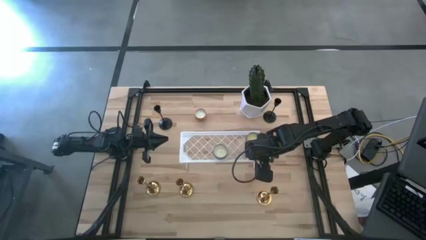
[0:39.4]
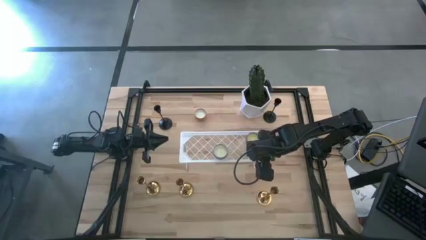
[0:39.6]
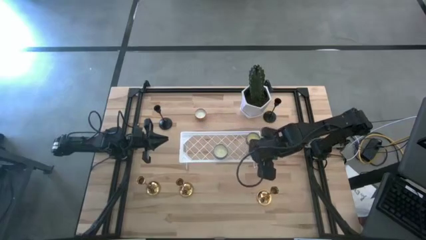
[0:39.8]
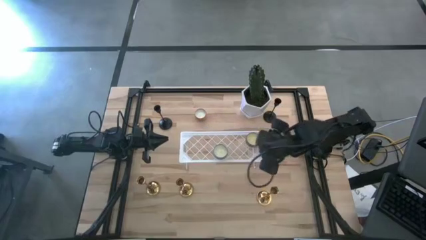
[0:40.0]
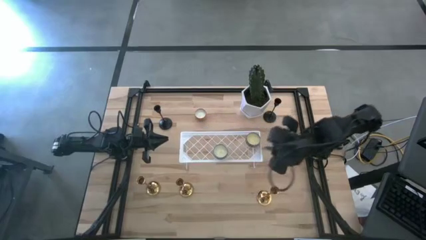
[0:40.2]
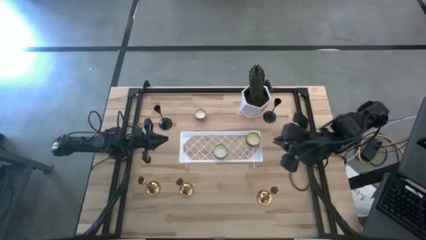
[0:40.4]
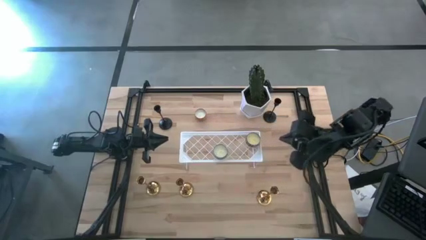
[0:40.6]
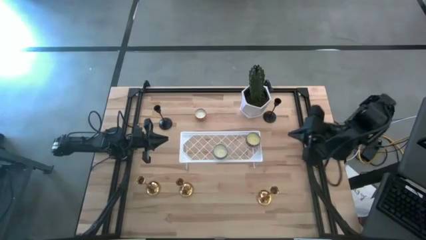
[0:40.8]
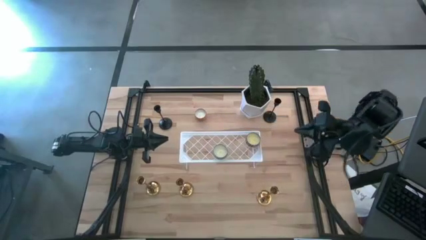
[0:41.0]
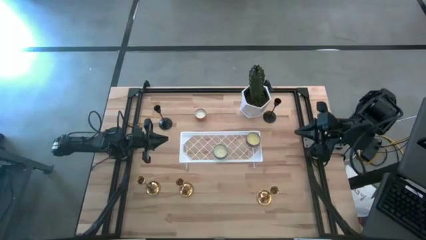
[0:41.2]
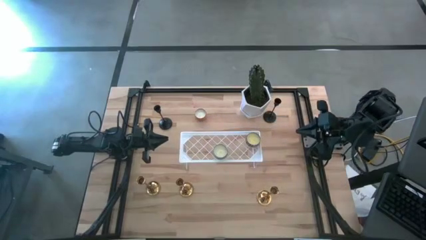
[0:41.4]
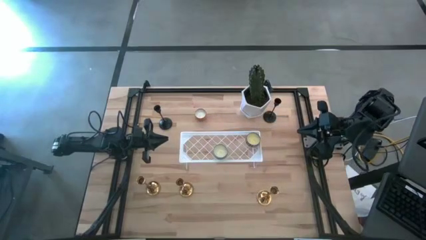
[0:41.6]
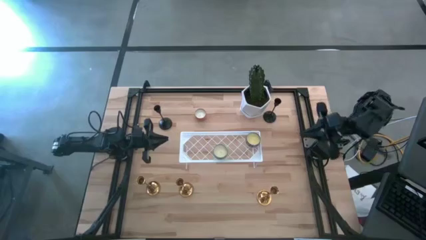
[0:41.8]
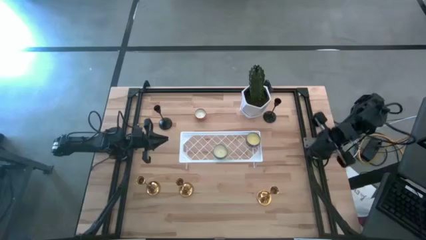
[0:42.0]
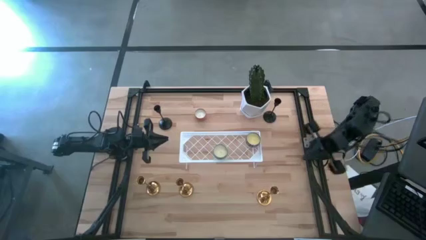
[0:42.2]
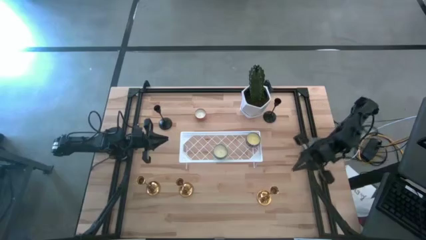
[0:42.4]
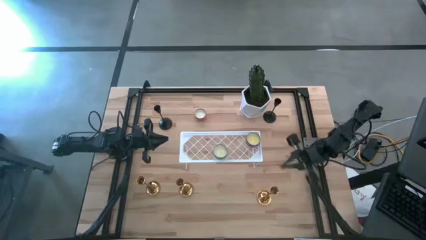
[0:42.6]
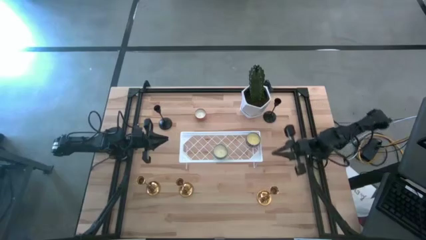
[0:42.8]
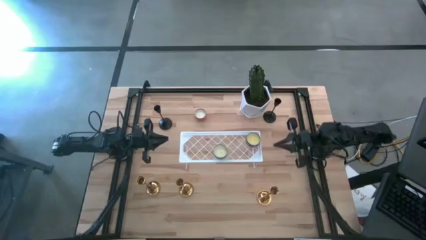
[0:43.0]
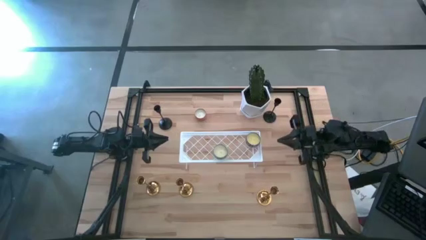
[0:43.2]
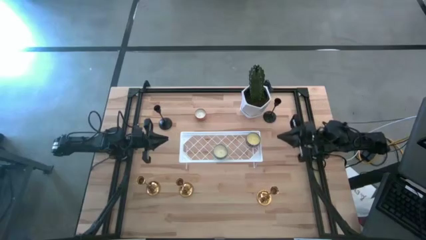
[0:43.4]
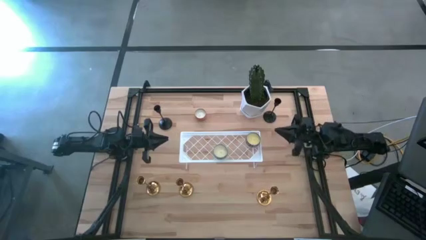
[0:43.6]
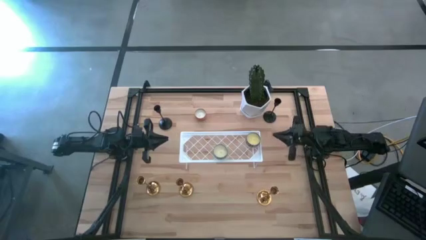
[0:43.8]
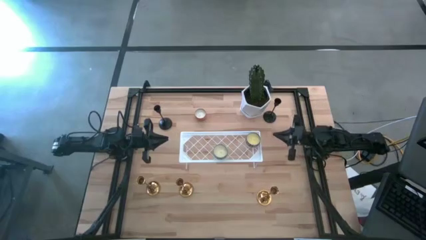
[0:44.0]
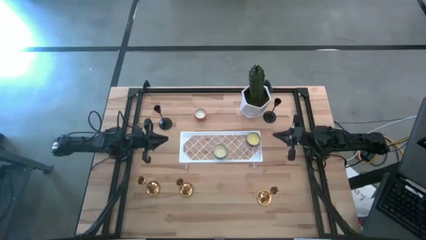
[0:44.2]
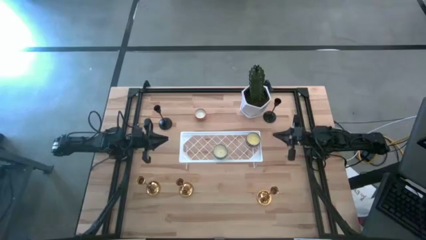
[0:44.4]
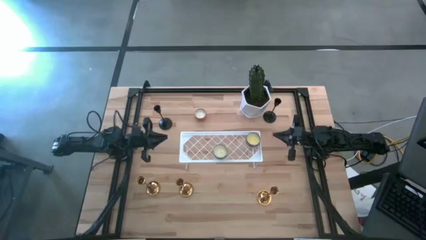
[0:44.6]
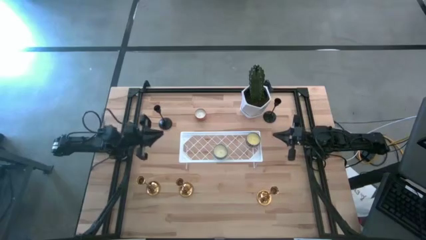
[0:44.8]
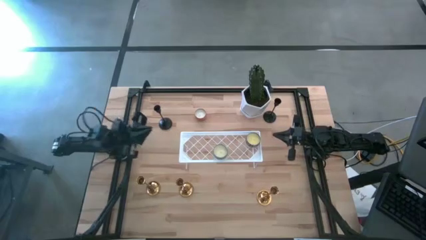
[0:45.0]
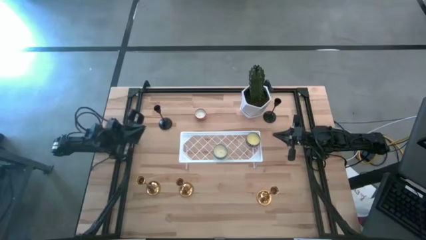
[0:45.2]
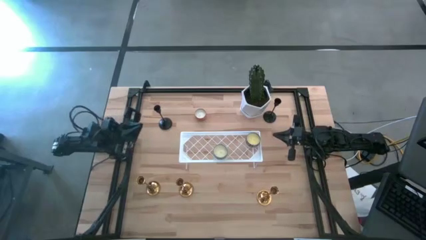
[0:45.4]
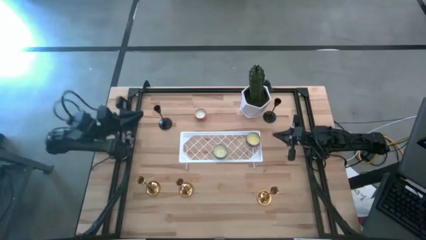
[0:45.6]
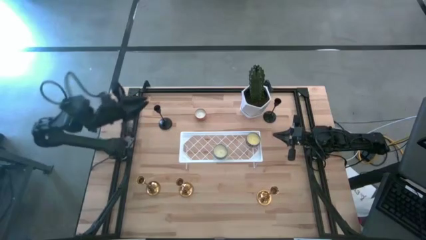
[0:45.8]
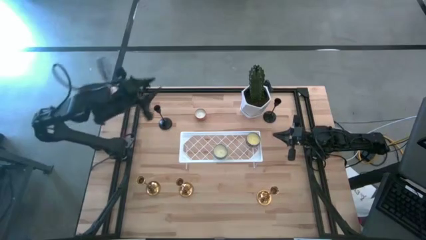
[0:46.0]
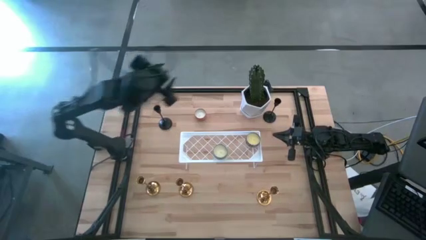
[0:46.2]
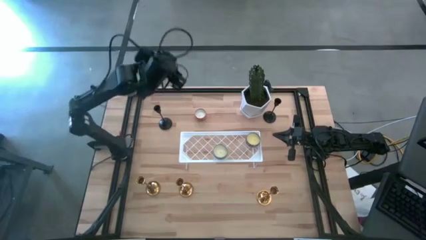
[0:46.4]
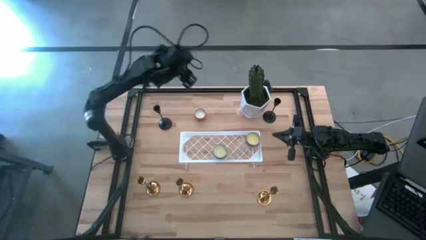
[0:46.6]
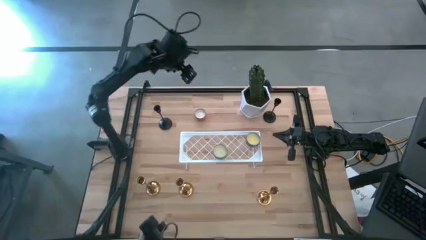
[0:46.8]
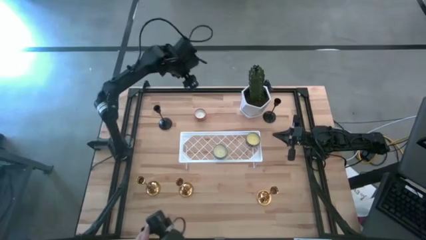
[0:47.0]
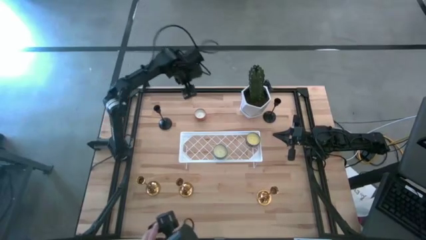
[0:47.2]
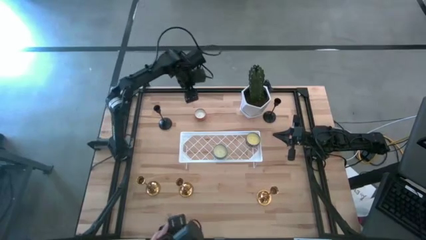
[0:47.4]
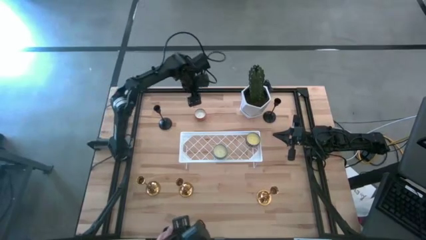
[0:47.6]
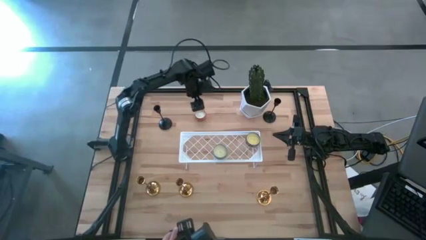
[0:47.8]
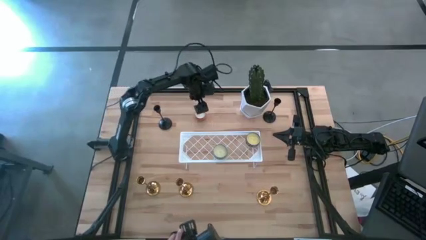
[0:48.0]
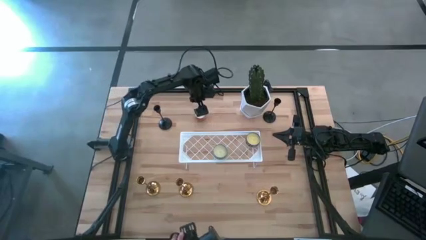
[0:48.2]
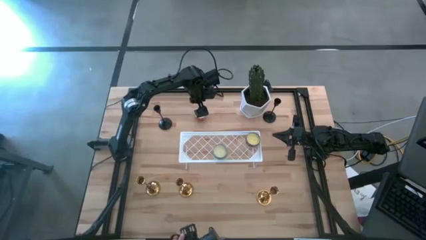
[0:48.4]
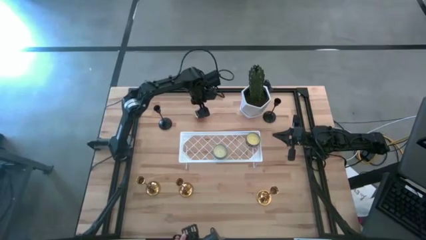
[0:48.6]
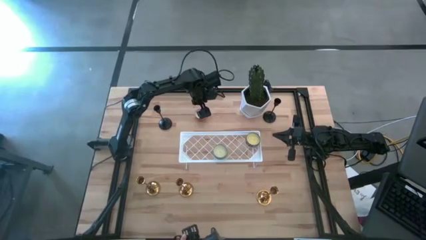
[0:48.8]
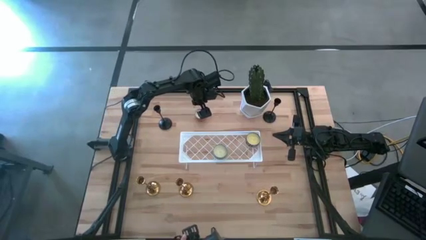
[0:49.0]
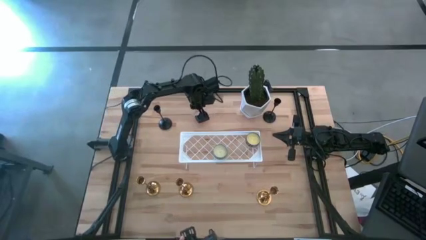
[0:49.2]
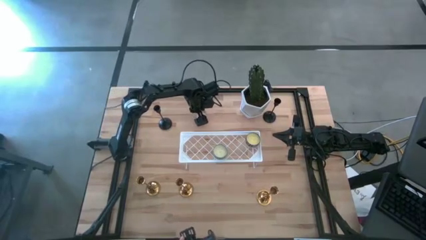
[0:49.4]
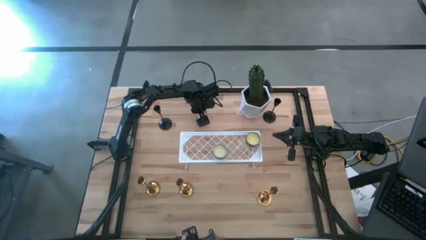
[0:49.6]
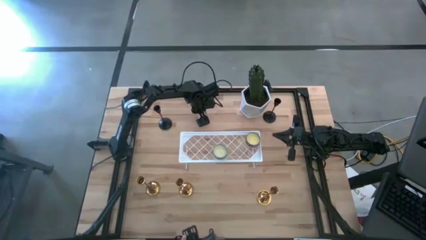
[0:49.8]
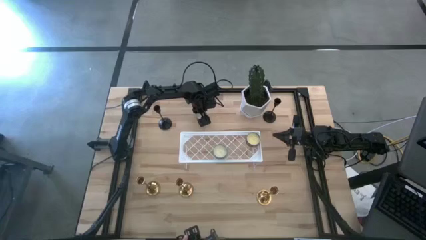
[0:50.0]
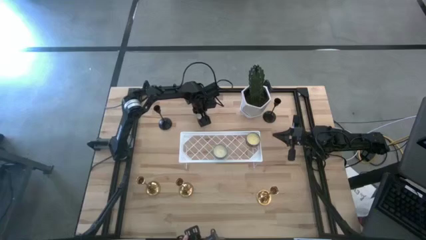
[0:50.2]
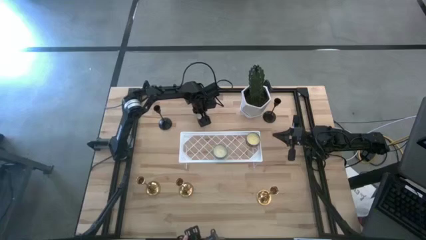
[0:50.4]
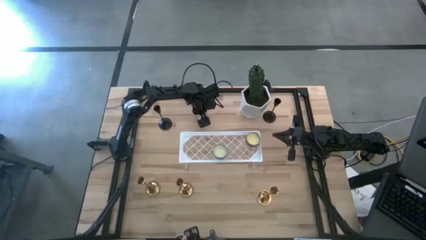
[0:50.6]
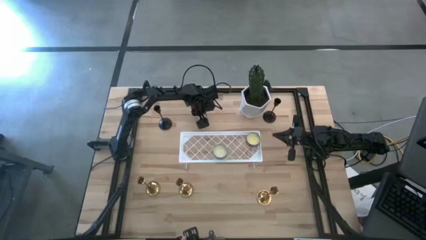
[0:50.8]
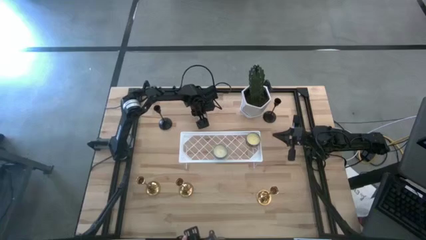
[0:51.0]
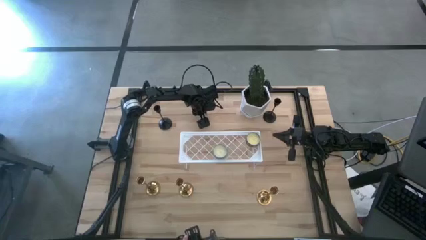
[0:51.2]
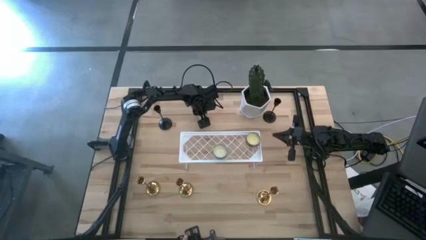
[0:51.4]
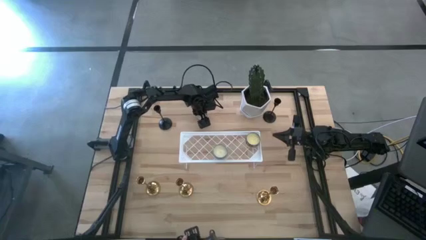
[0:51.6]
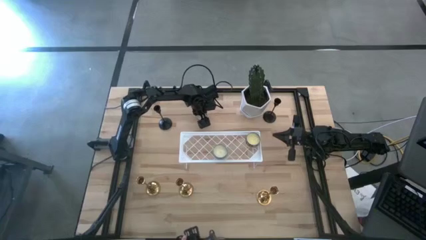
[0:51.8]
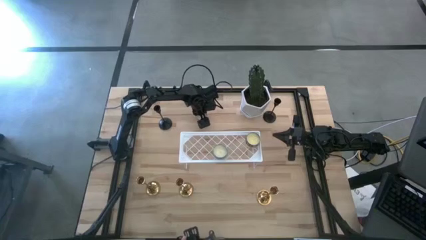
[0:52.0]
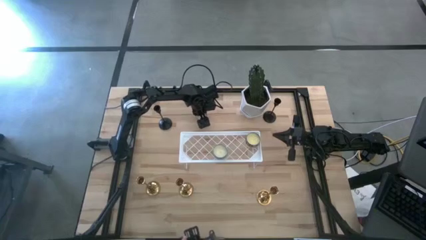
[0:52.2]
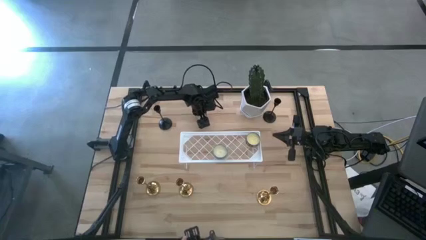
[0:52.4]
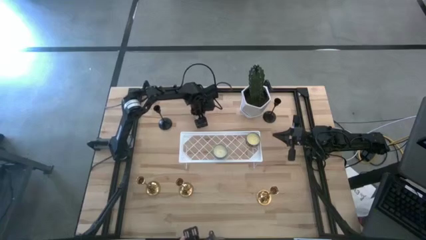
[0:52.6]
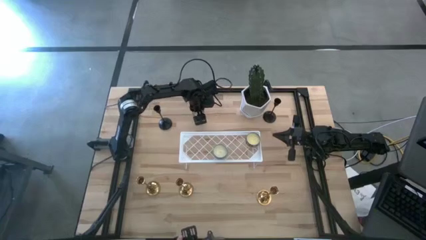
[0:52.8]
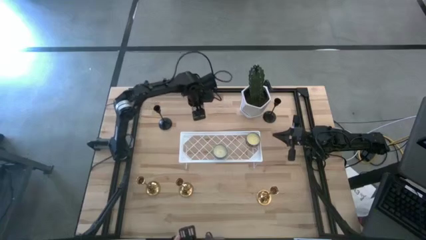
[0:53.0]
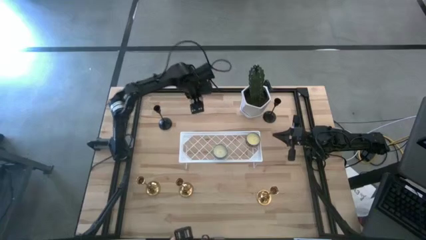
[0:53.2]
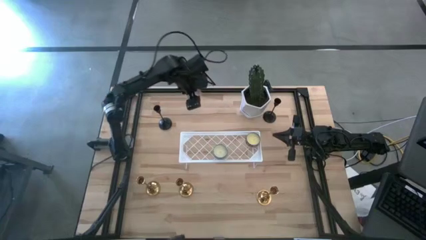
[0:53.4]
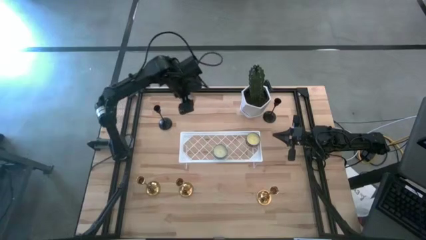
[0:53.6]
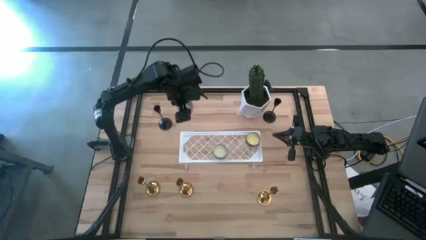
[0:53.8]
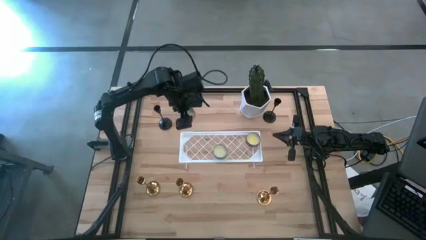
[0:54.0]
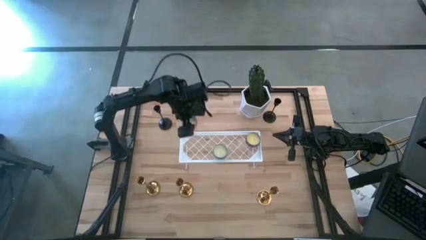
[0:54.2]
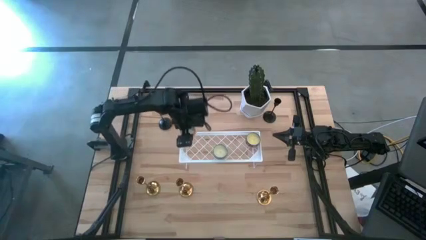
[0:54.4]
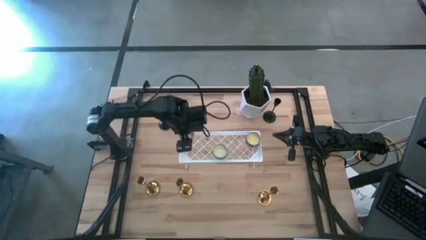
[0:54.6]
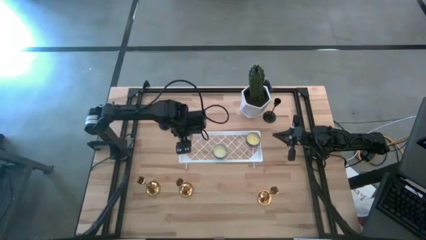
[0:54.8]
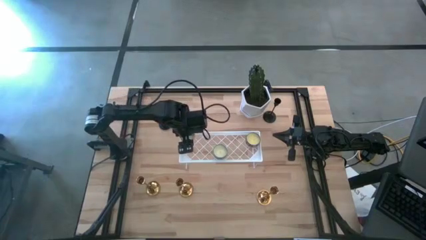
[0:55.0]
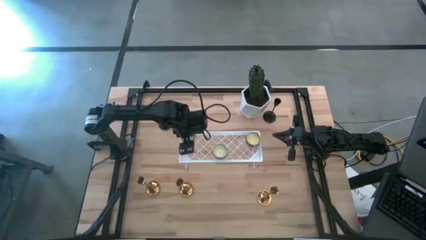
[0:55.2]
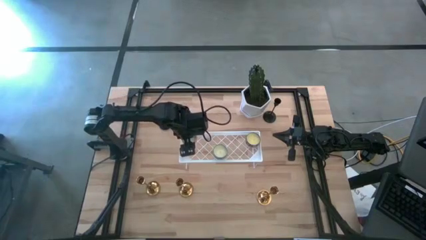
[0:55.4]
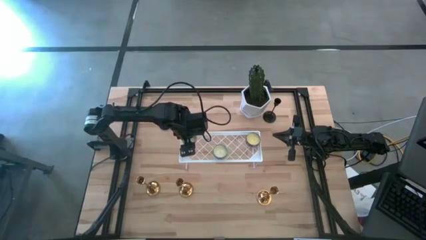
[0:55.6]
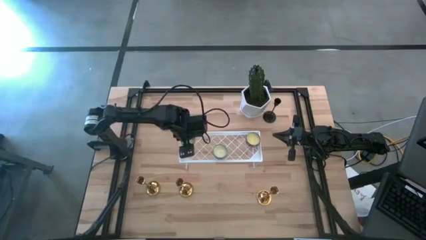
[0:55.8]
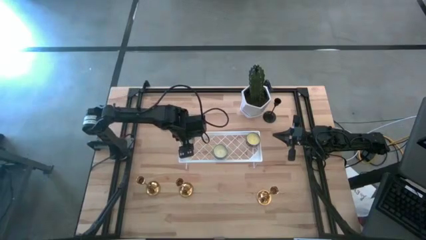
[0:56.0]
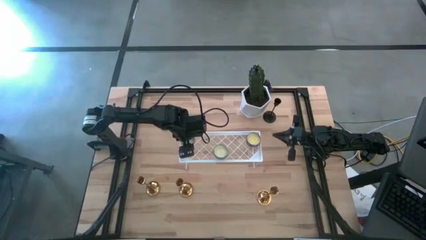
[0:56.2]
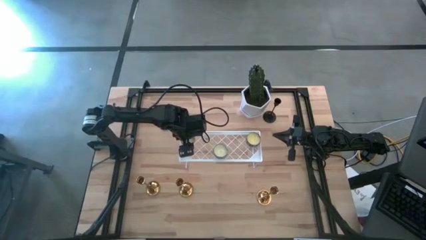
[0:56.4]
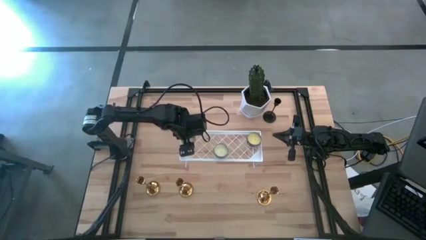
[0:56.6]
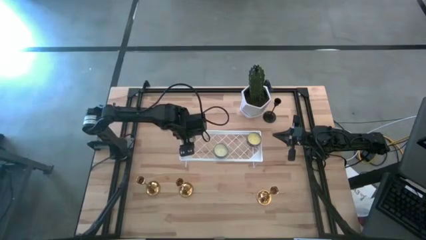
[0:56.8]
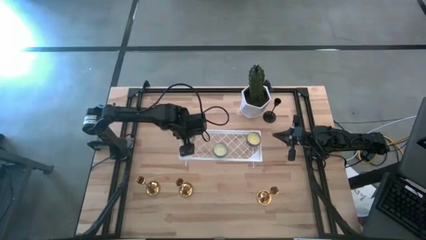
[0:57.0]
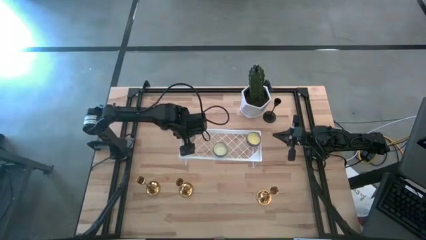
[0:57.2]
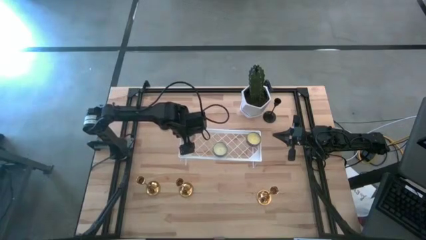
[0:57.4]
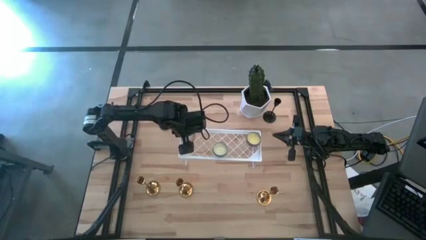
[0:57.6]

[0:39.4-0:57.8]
Task: Pick & Place candle stick holders
Put the orange scented candle on the shelf
